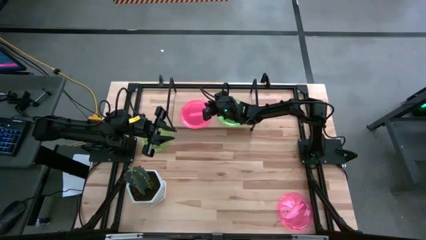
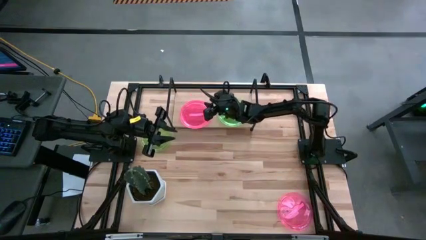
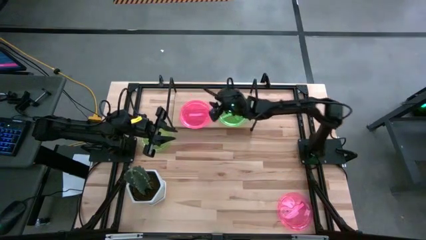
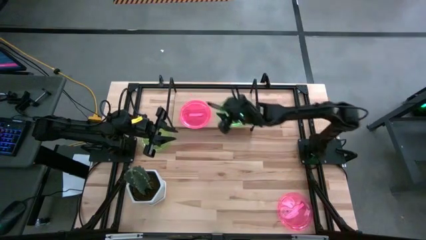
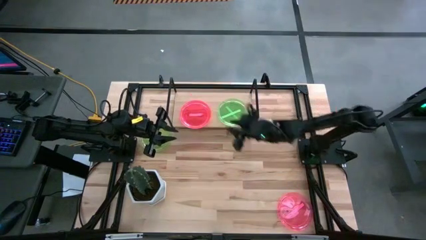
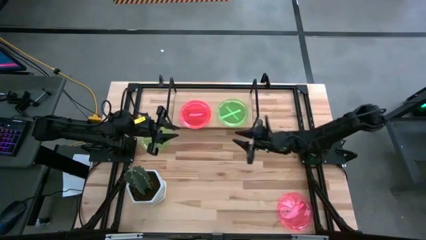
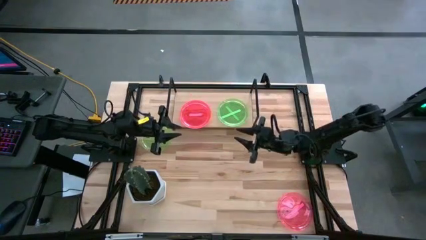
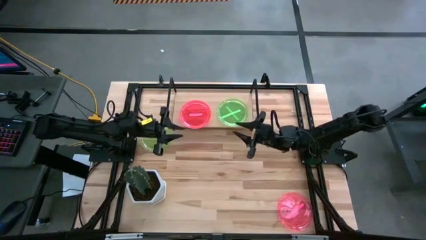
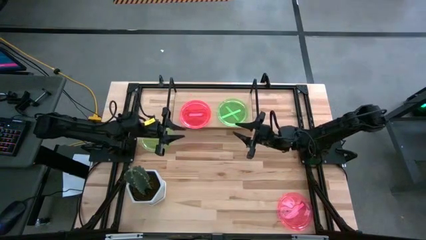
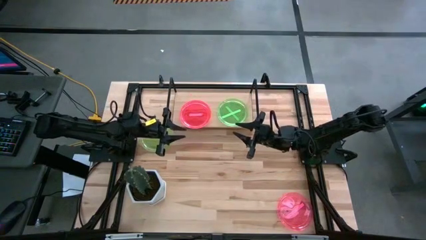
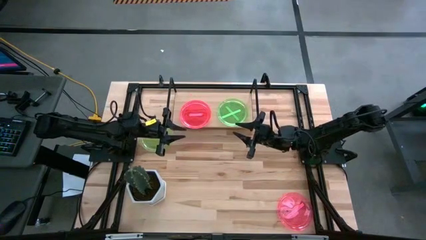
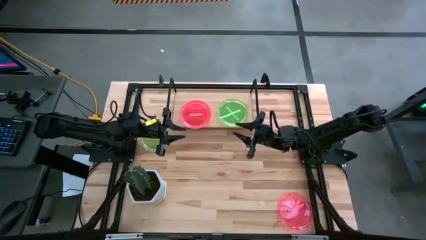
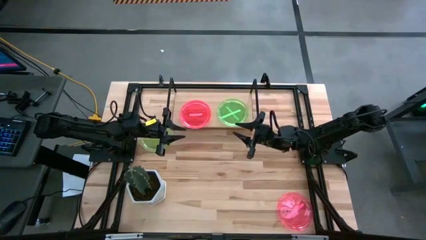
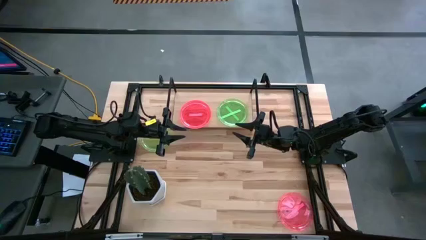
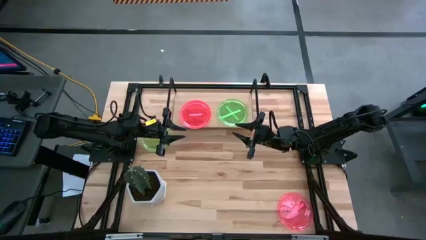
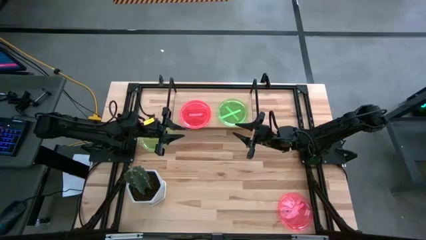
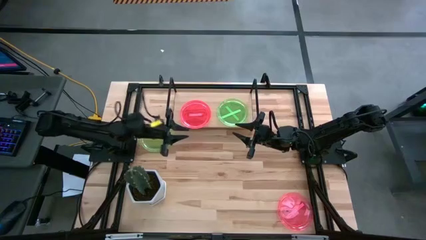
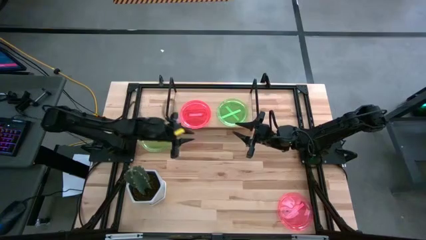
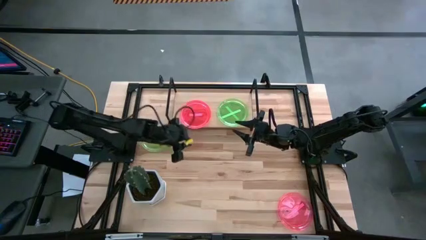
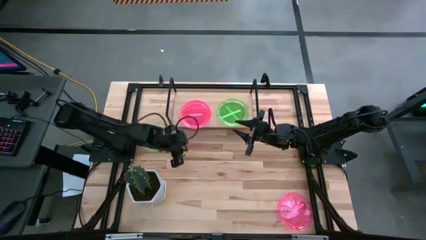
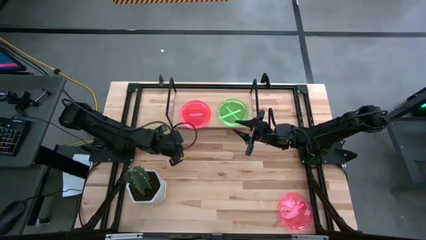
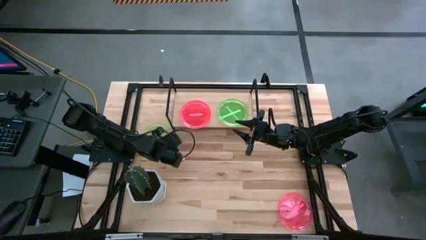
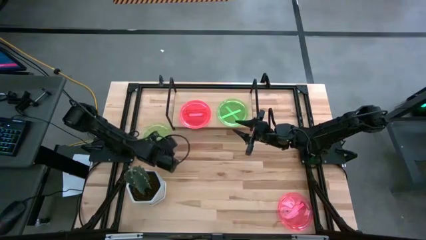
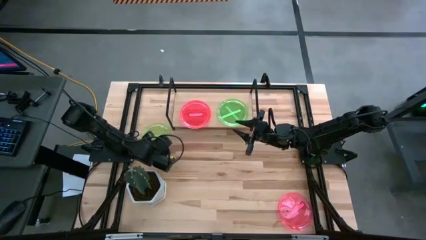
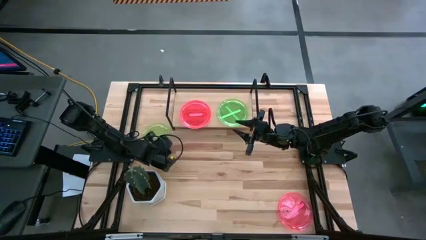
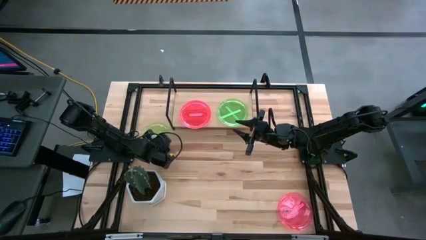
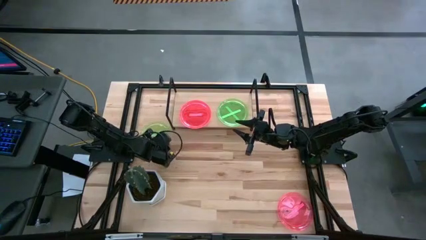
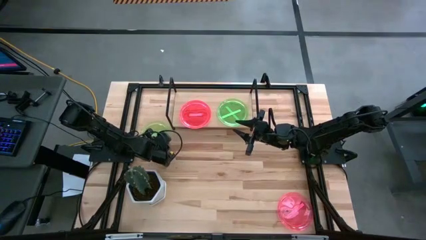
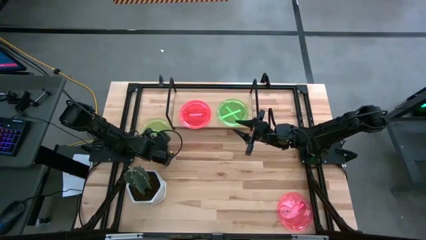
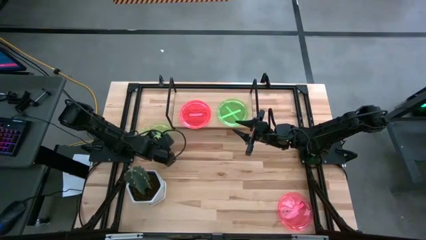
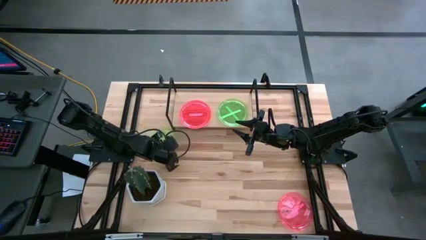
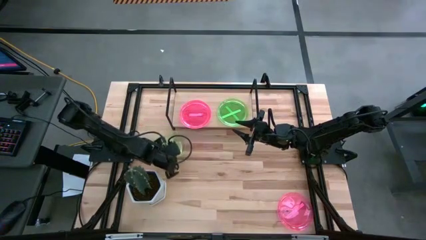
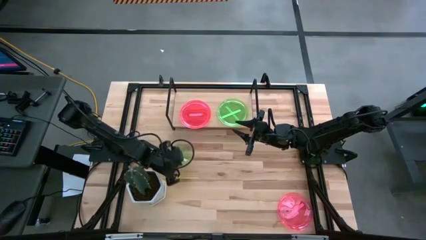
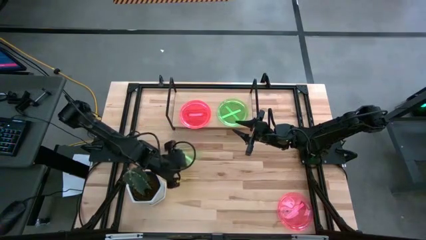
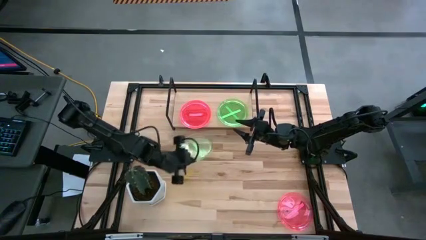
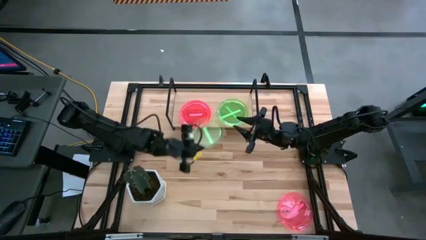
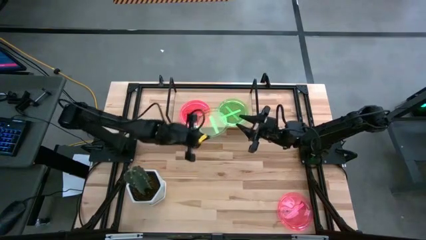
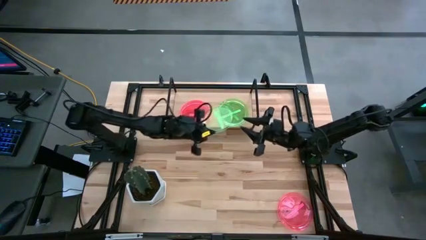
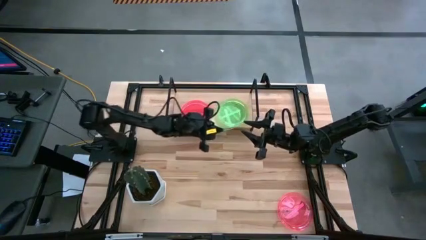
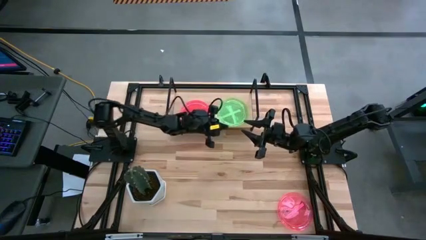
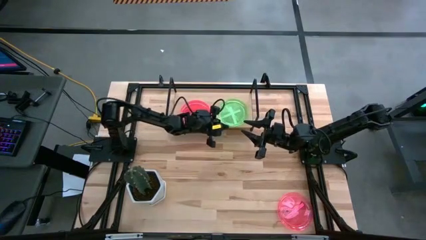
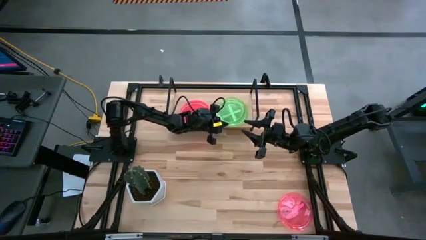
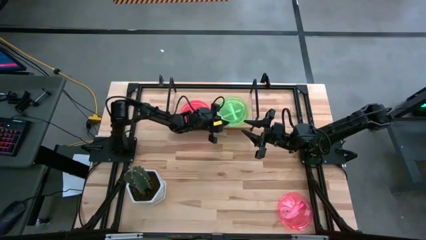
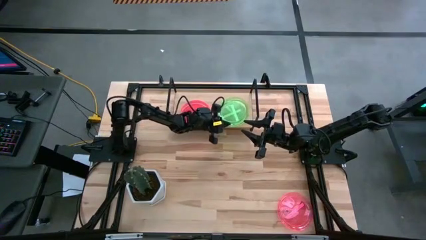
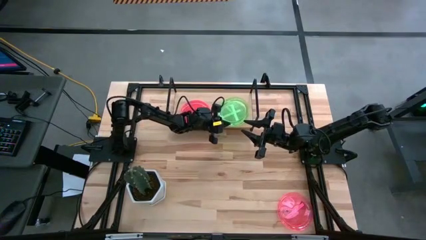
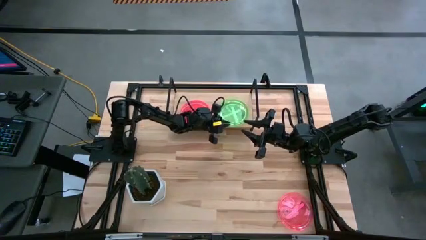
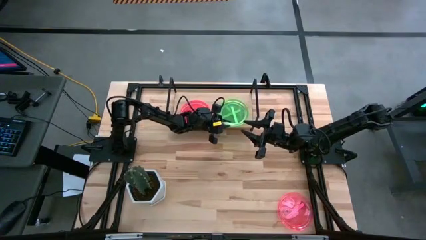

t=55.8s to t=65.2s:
Task: Place and stack plates onto a shelf
Stack the green plate on top of the other green plate on the shelf

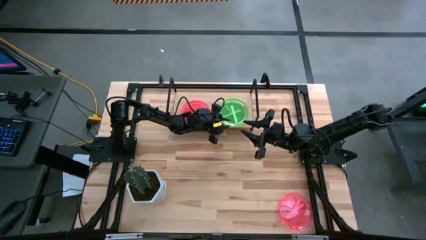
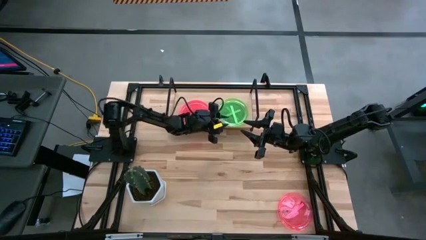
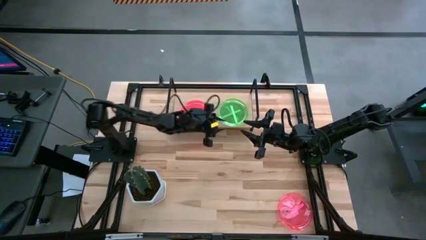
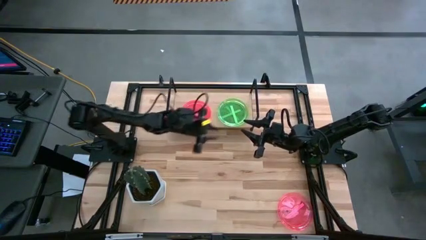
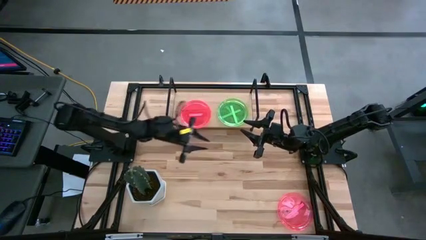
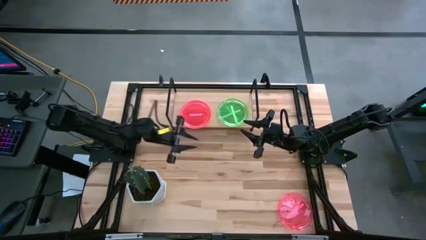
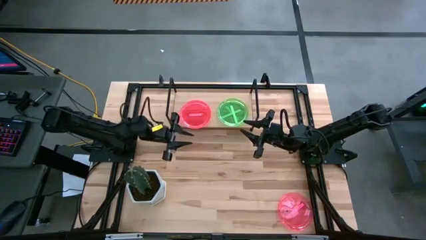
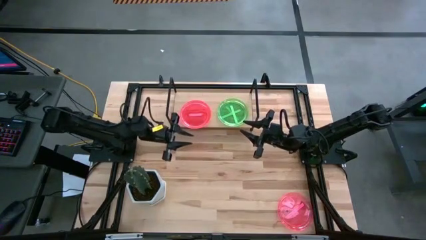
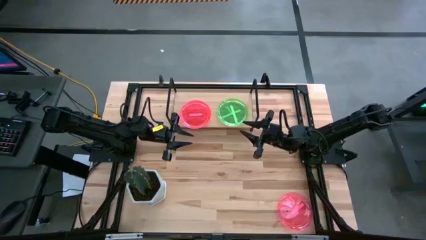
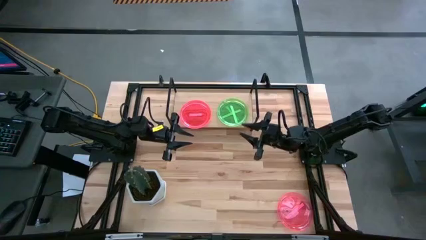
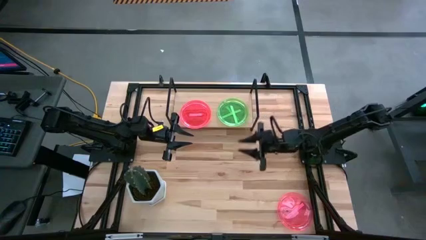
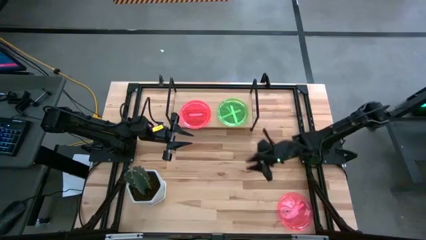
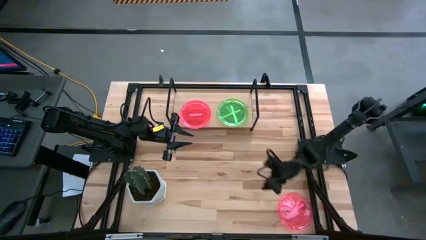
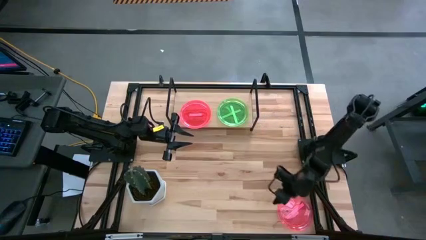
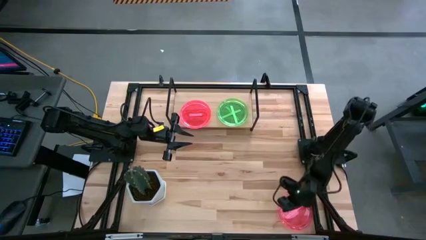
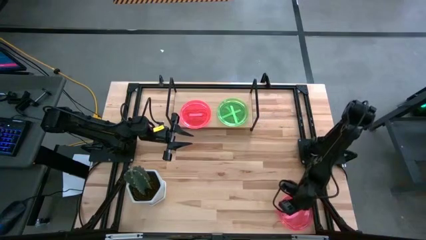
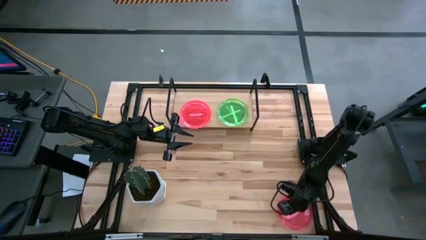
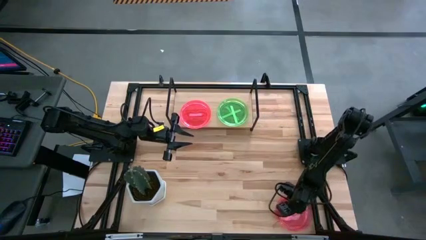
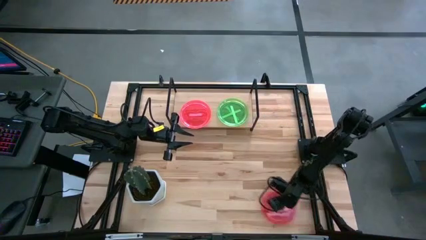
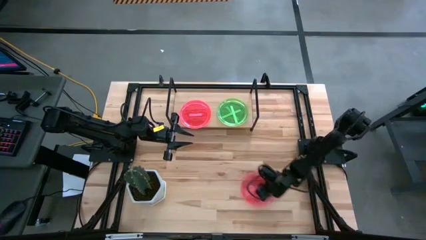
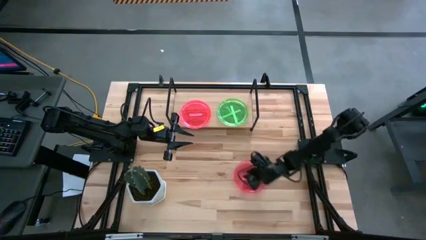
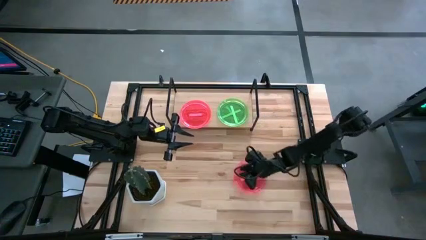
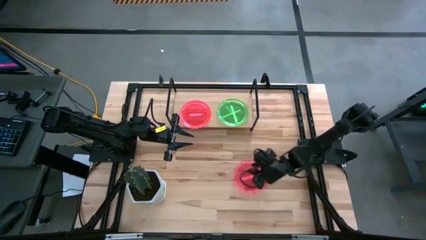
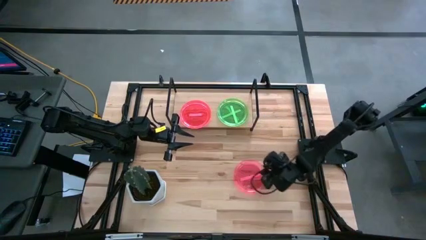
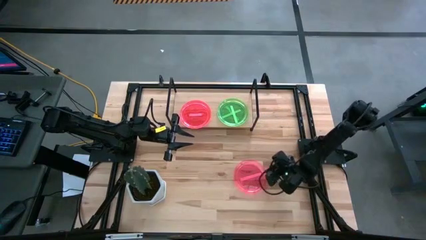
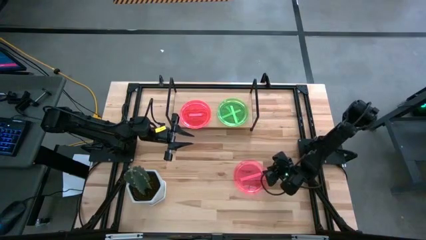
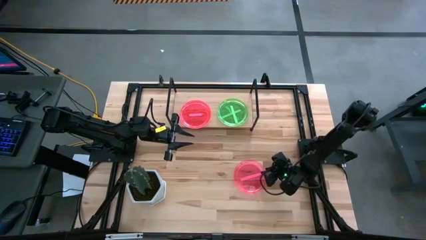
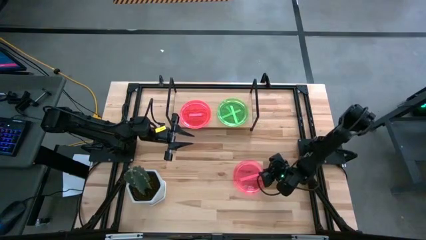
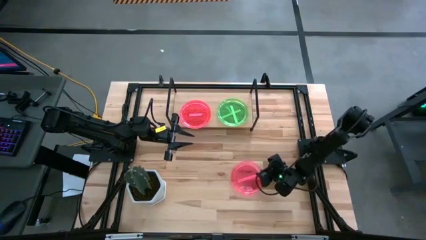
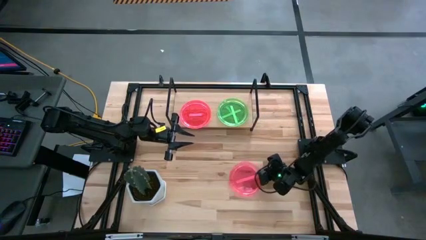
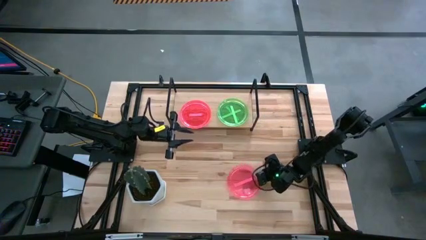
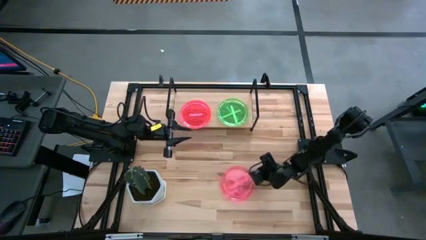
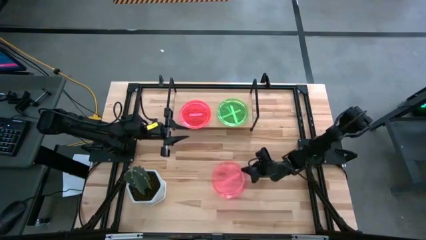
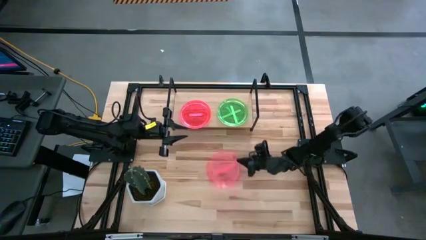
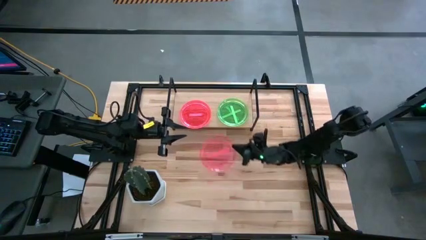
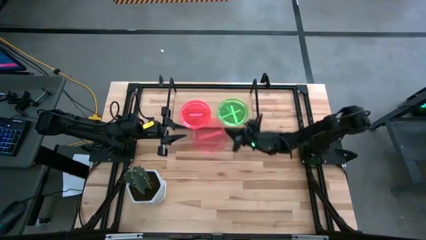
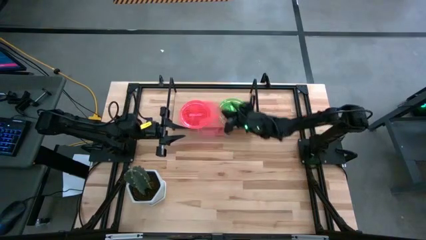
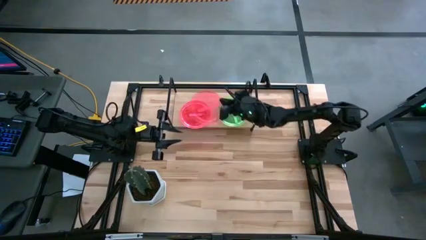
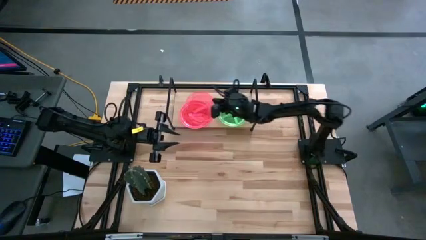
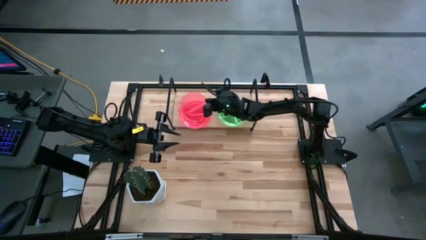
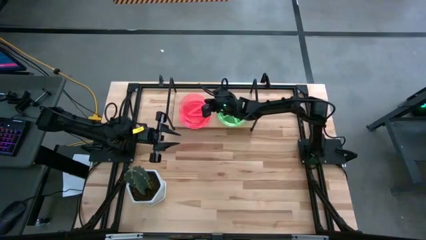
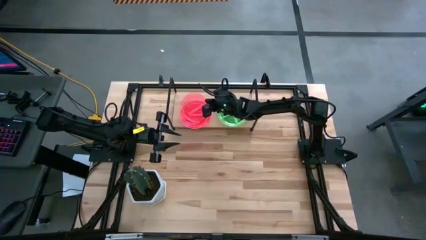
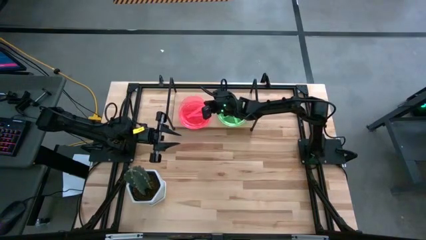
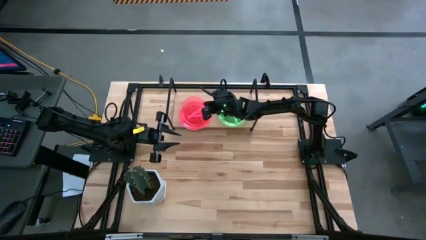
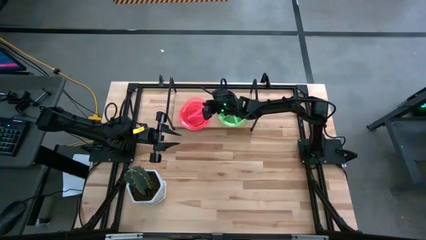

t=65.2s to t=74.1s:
Stack the pink plate on top of the other pink plate on the shelf
